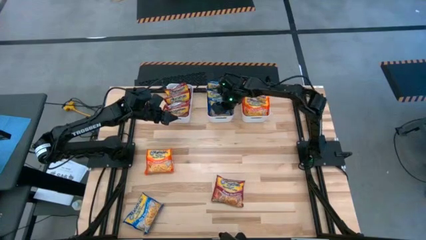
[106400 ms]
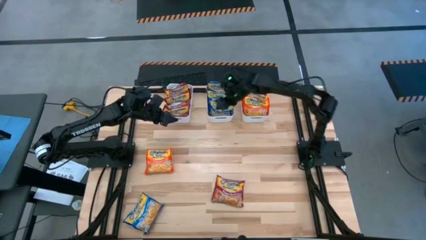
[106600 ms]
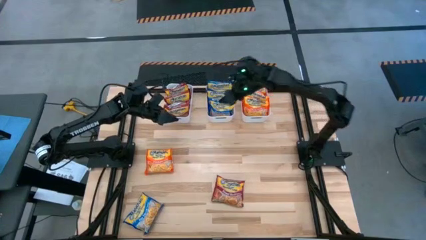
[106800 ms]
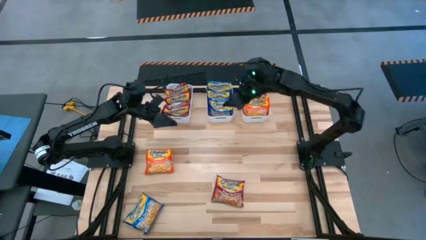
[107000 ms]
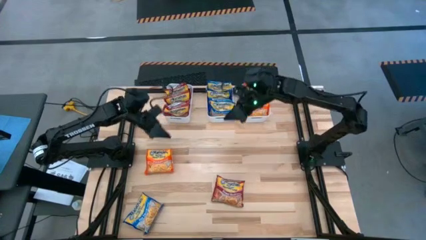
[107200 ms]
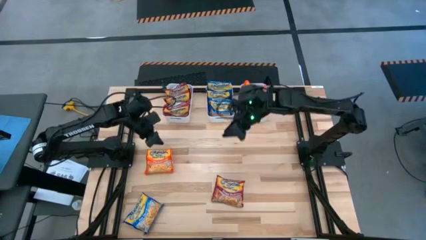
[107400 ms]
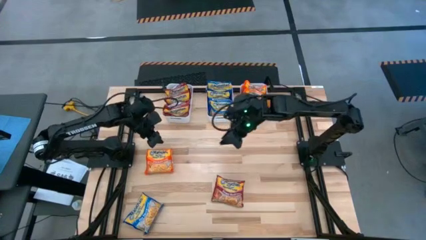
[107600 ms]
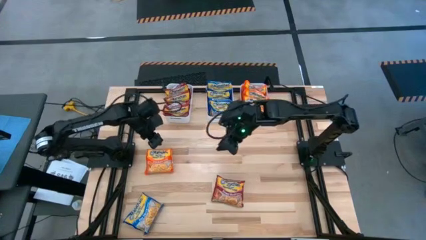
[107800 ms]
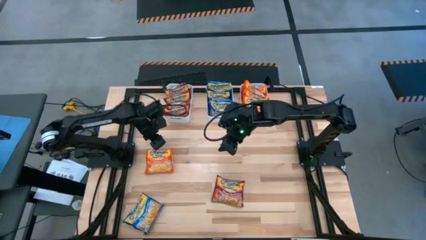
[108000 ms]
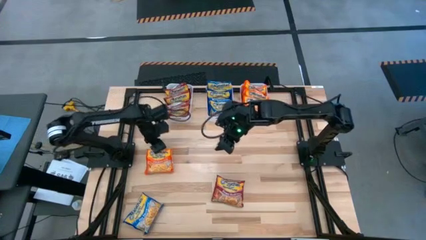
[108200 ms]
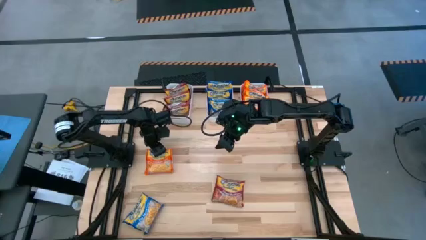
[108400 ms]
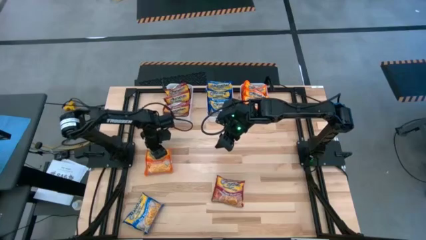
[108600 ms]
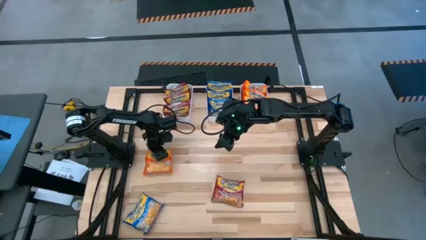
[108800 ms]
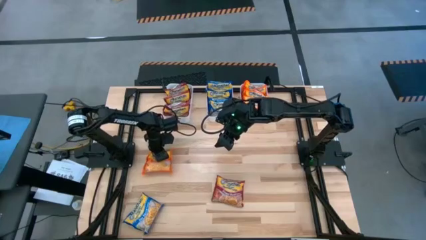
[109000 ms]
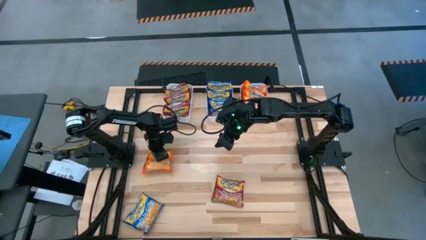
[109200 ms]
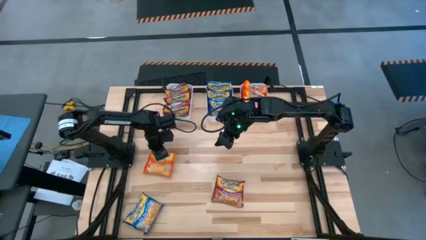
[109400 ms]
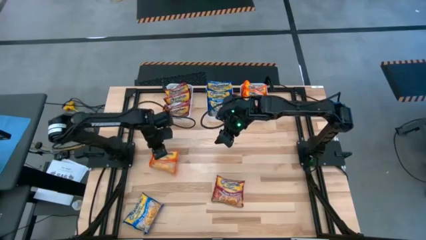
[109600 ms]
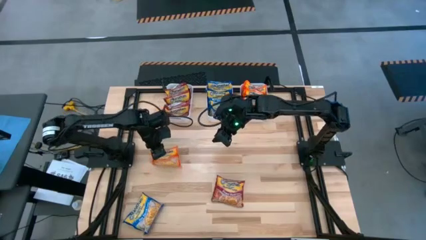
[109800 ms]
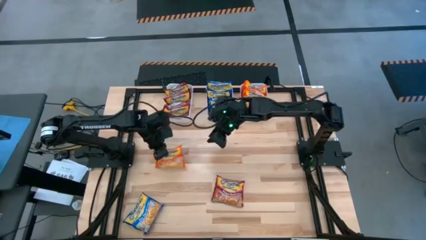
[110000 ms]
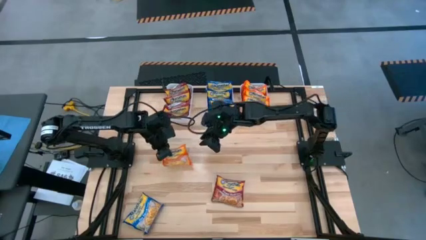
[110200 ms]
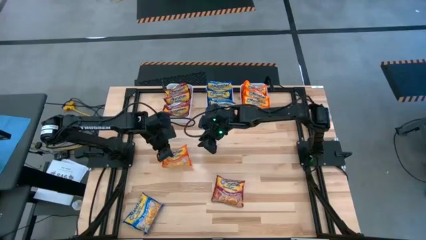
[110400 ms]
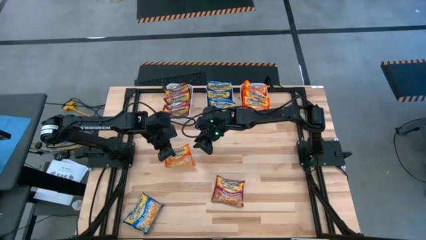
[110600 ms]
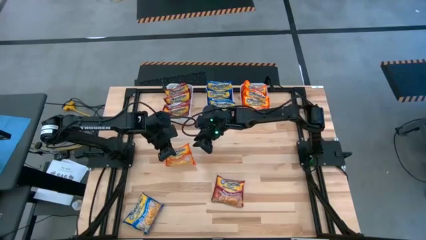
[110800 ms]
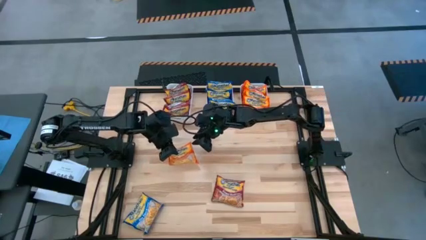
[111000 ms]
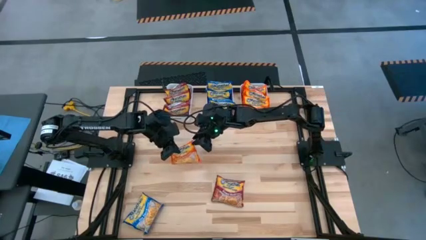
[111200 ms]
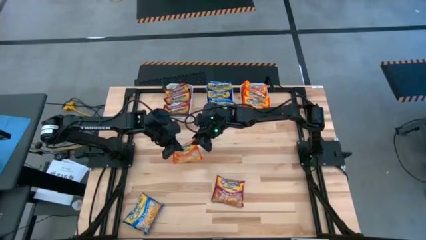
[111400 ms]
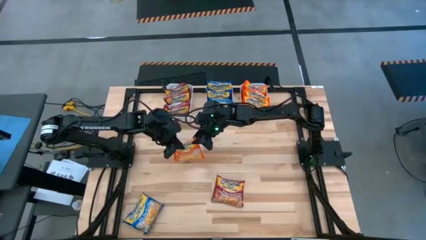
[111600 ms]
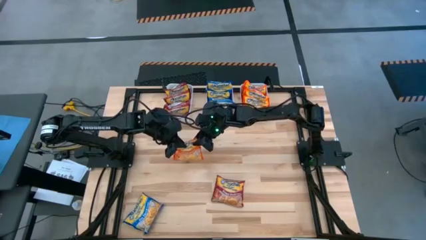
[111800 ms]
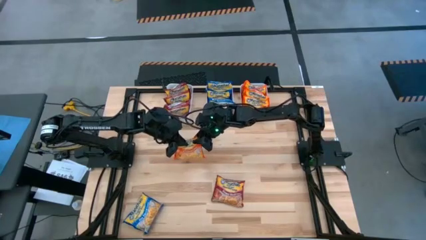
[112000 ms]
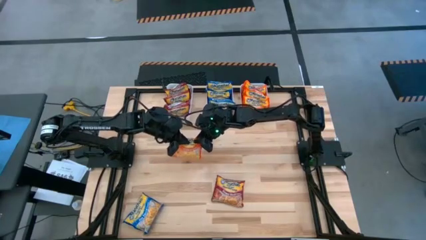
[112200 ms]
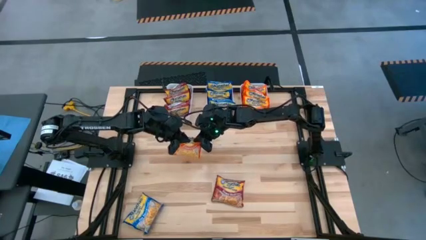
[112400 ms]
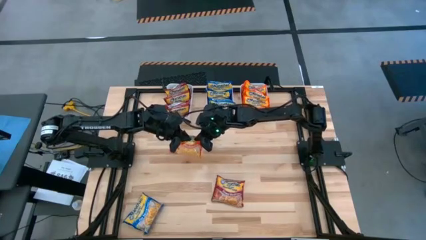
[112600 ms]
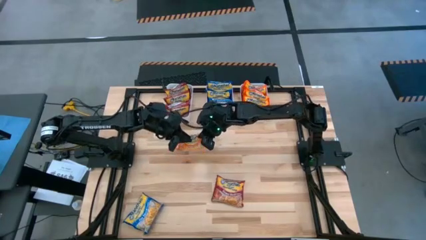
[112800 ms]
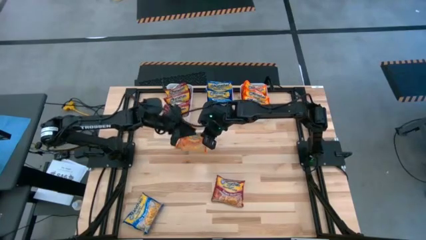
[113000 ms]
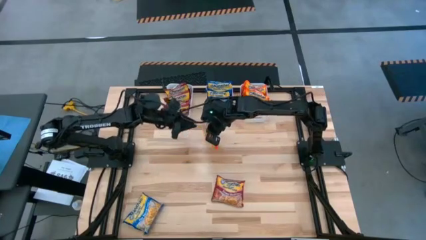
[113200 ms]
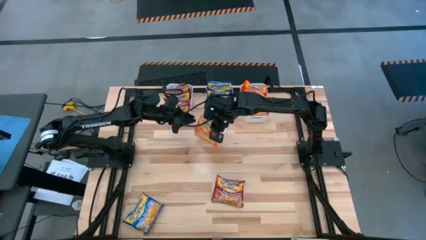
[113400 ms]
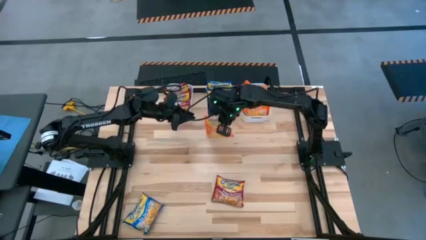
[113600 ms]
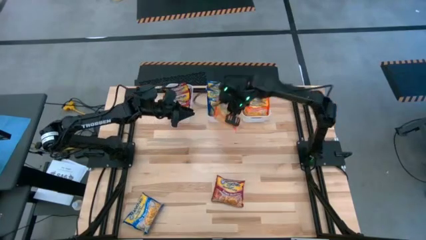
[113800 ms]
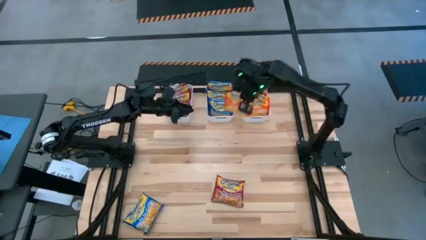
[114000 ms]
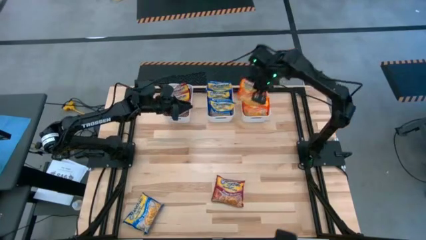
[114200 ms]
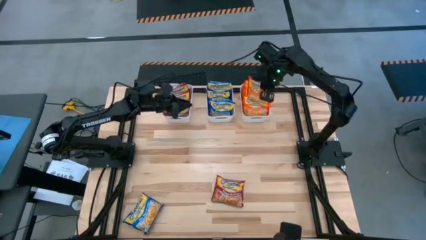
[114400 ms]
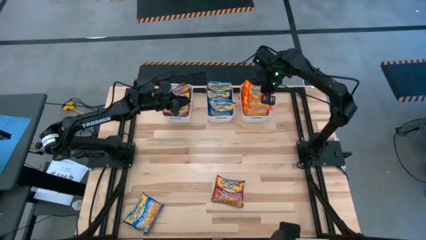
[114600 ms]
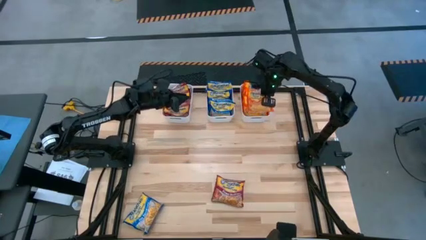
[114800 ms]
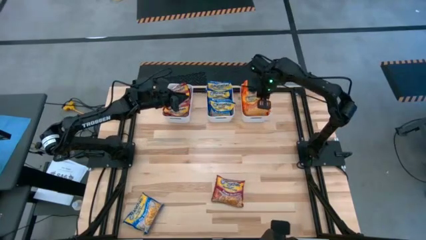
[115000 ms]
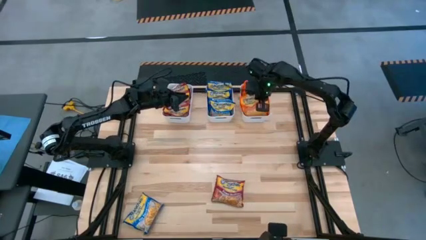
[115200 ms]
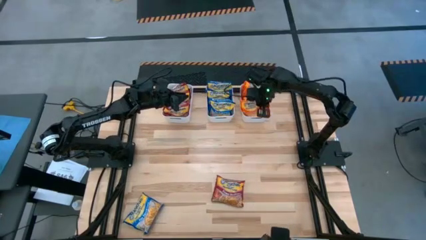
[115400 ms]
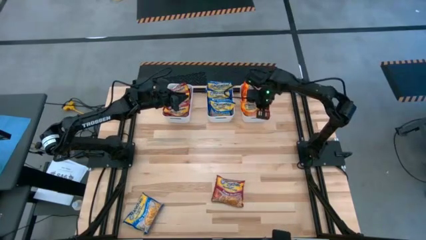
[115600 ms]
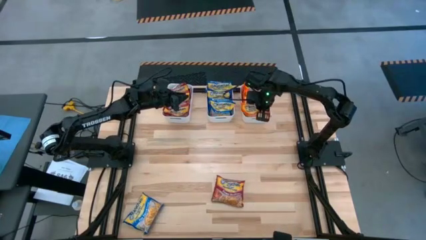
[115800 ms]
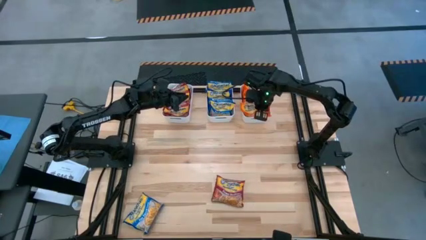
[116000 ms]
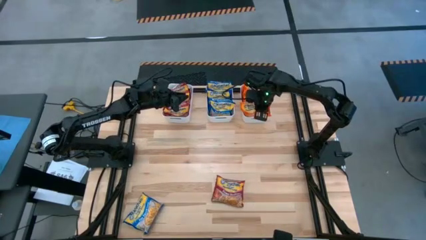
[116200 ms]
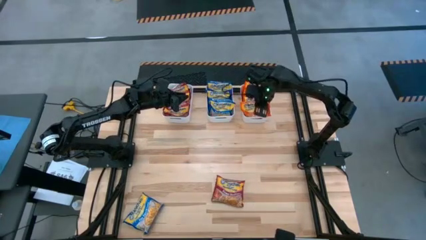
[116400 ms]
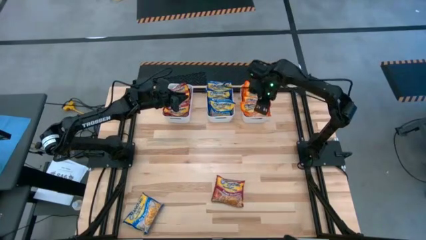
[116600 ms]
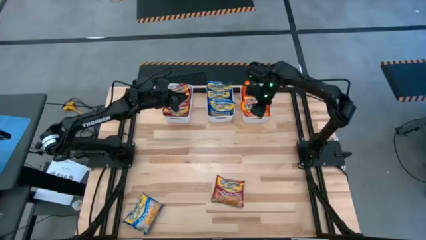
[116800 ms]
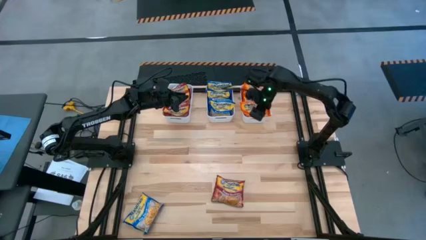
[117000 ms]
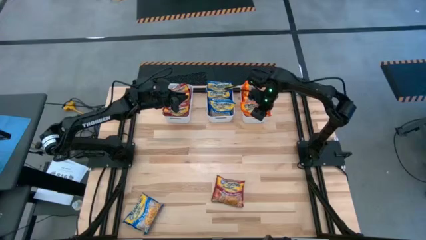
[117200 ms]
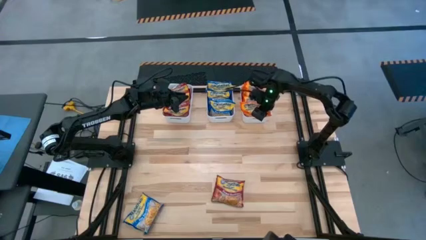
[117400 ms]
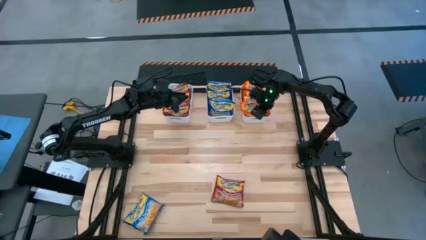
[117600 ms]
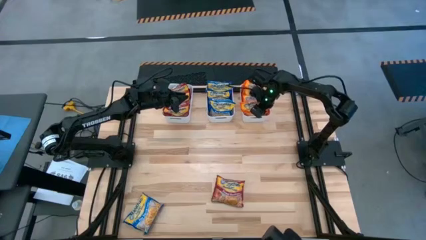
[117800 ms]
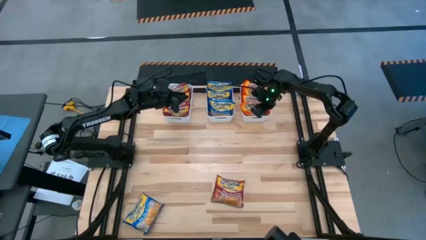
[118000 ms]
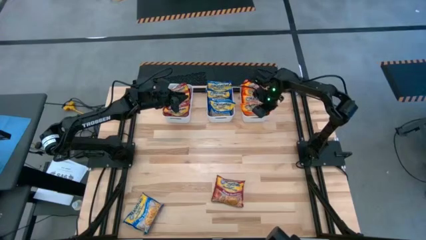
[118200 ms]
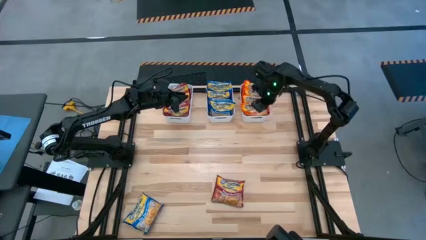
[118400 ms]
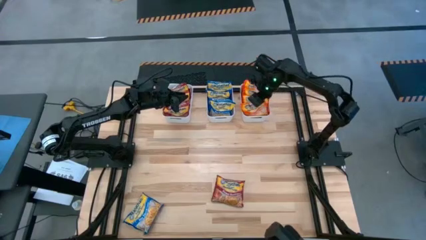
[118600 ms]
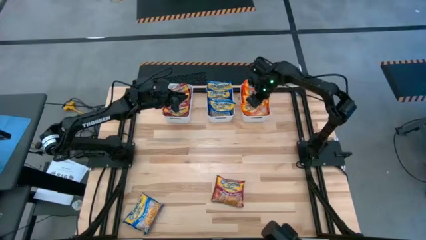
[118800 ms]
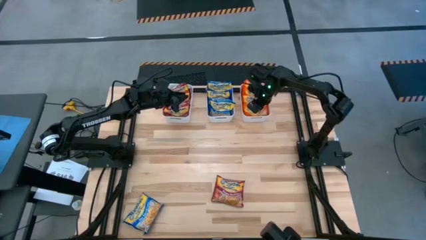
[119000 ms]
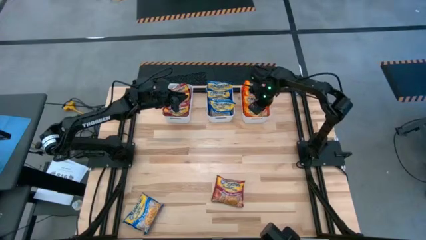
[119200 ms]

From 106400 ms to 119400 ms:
Task: Sort Maruchan noodles
Put the orange noodle pack into the top right white bin

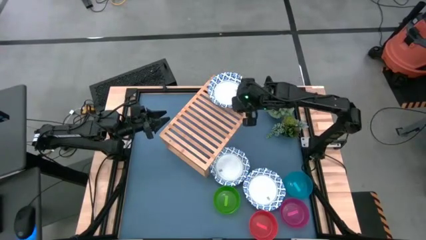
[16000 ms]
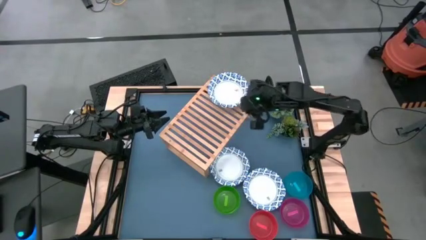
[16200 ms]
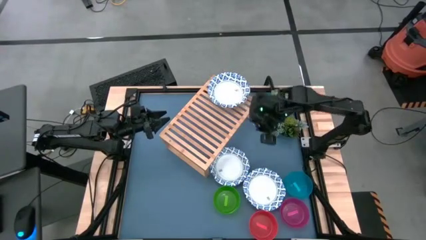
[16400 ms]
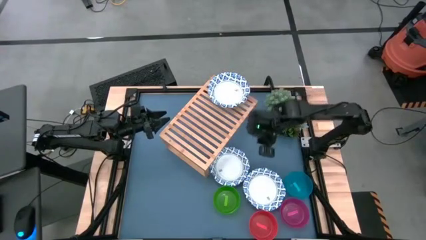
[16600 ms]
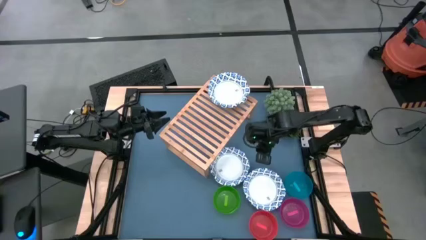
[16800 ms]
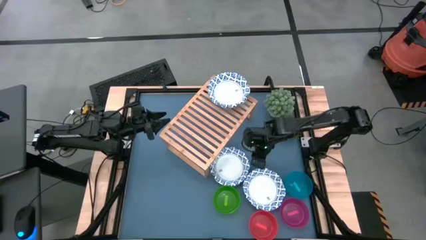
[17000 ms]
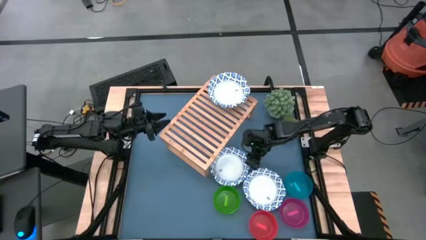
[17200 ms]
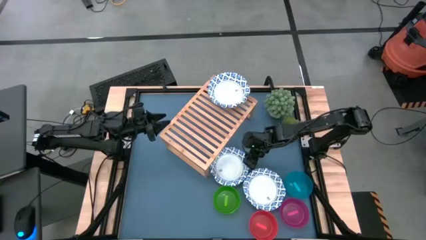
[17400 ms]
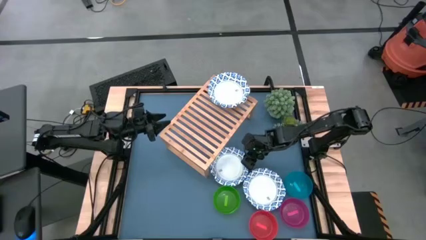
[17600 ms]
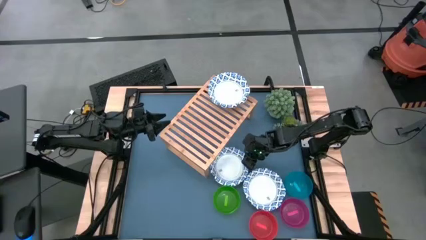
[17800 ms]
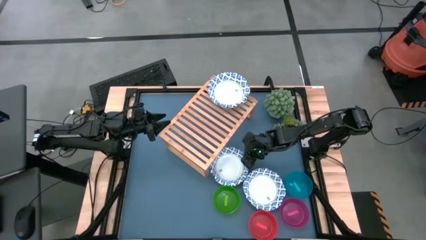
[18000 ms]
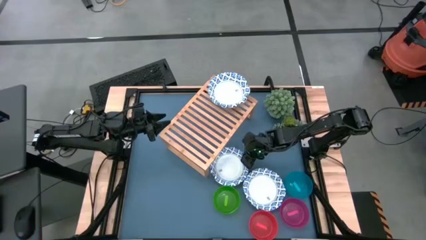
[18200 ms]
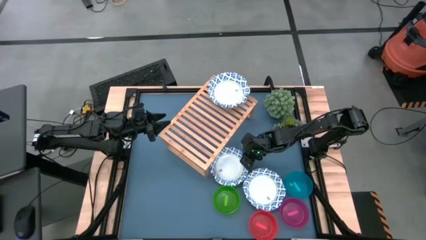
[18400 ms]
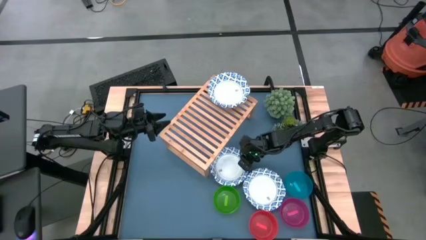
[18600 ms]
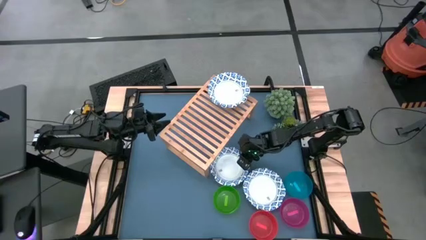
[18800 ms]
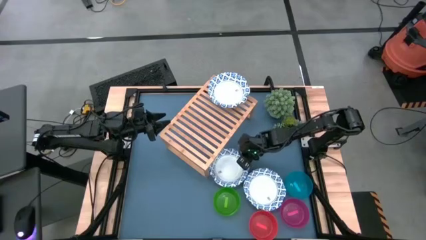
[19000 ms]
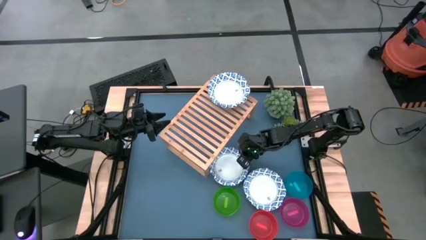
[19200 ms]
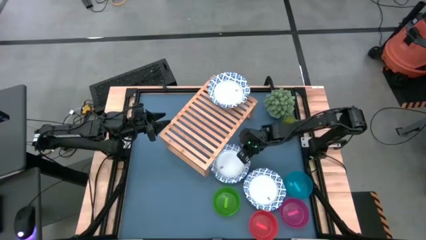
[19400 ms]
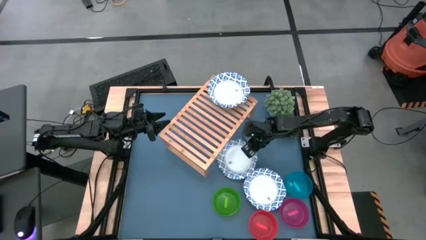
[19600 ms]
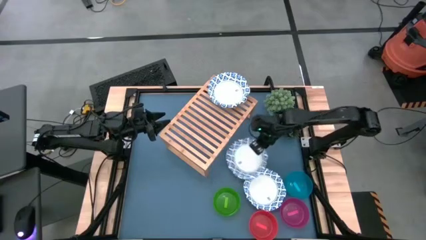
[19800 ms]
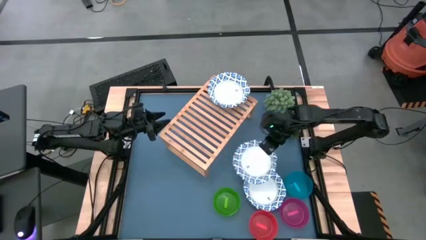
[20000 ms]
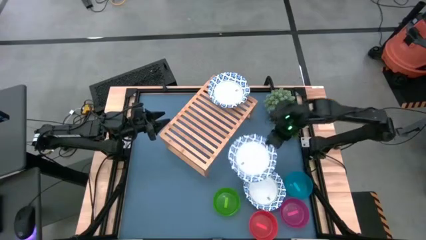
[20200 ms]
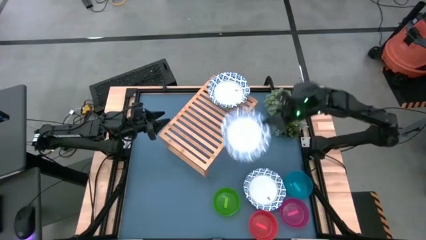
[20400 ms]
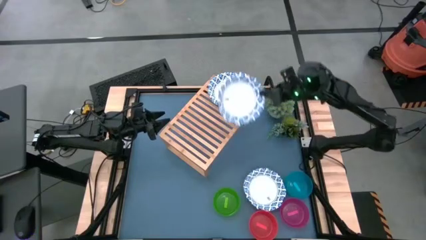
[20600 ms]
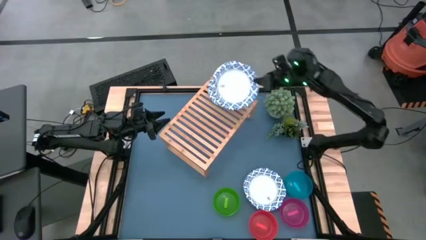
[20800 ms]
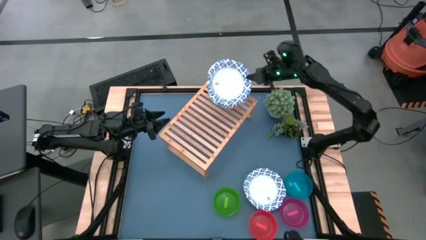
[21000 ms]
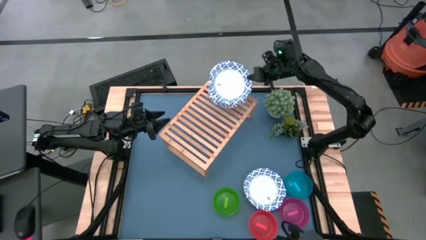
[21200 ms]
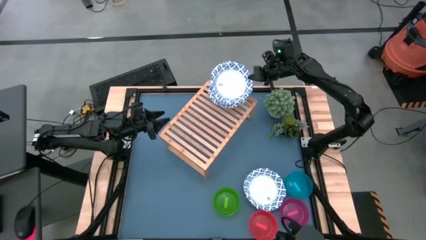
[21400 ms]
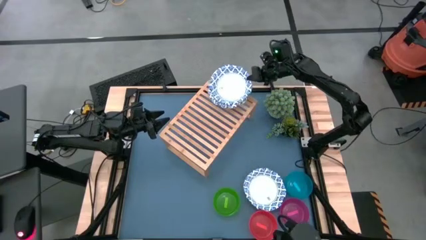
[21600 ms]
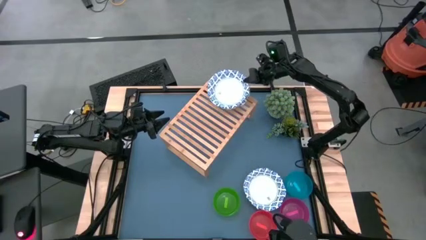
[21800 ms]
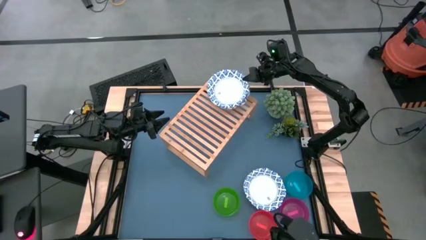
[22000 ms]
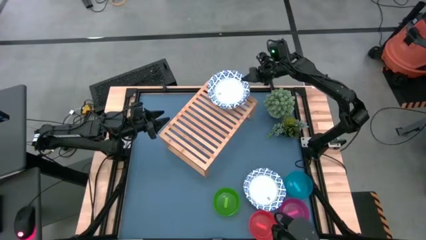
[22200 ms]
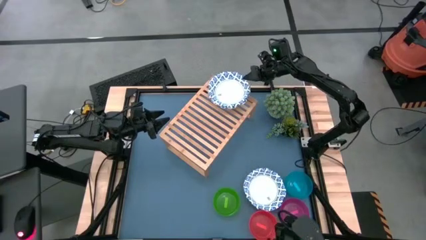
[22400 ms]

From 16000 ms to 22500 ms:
Task: Place and stack bowls onto a shelf
Stack the white patterned bowl on top of the white patterned bowls on the shelf
